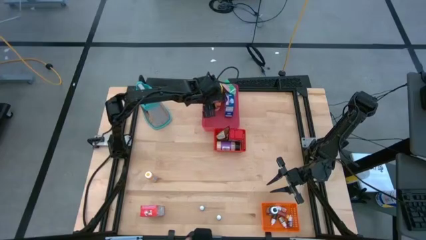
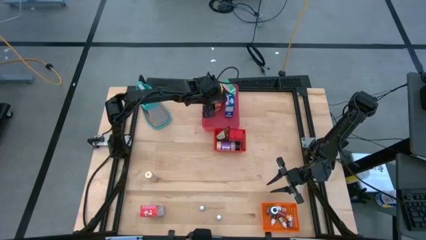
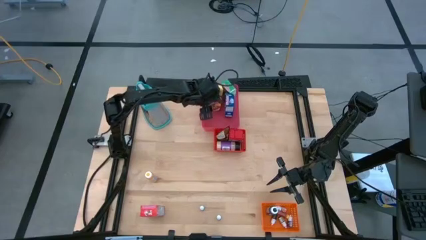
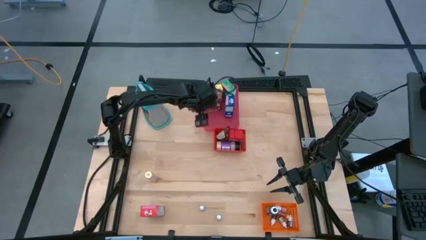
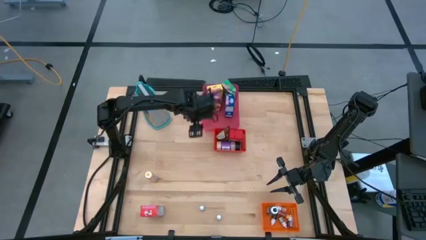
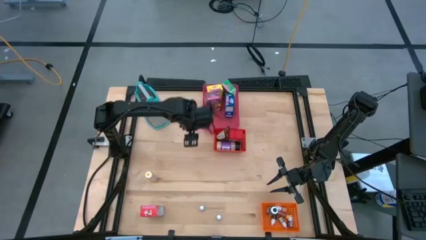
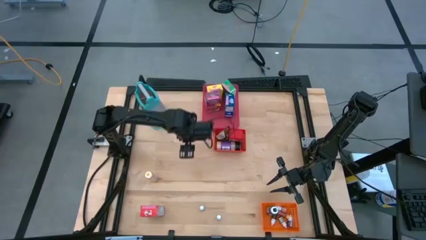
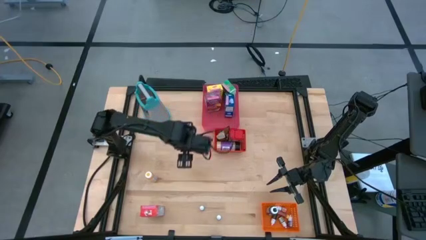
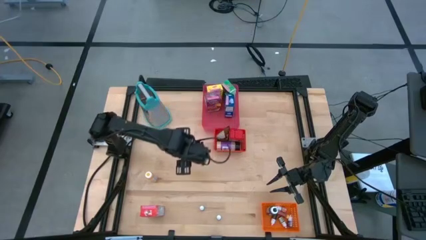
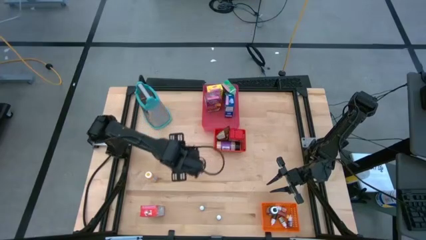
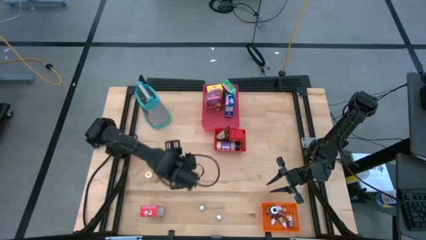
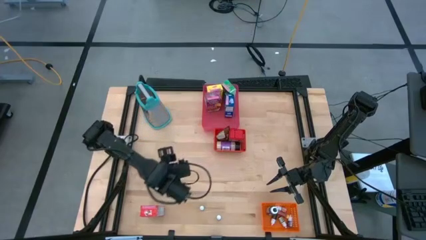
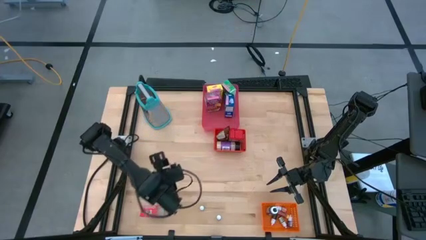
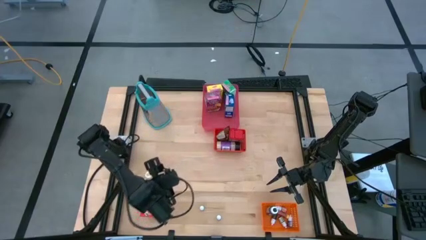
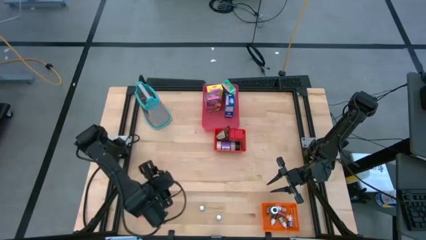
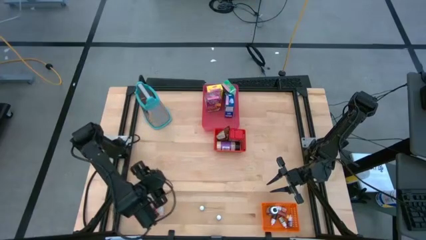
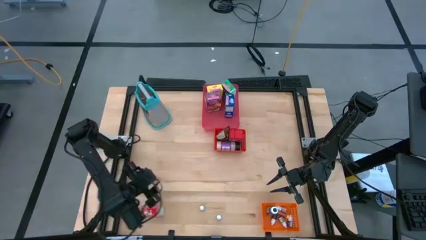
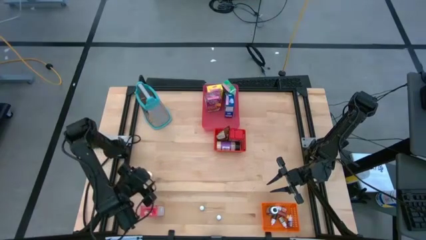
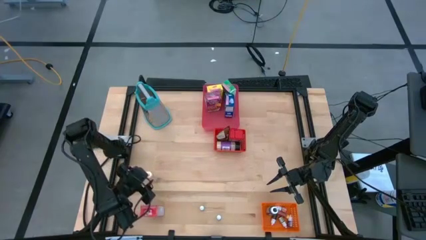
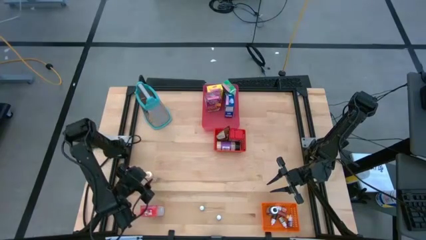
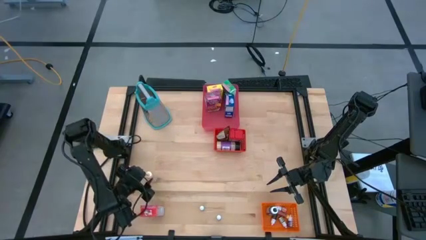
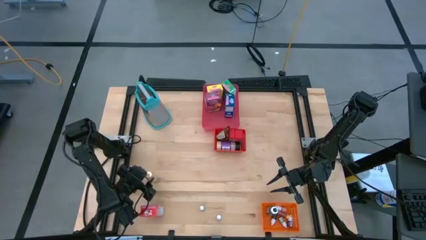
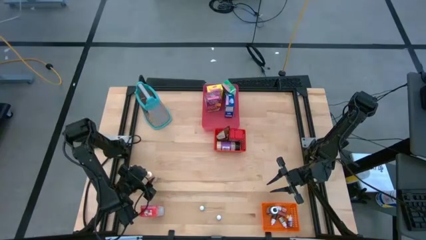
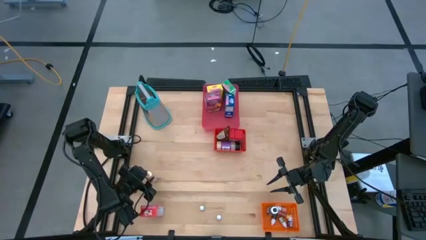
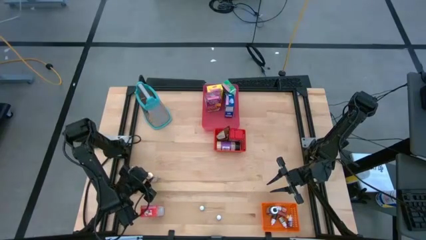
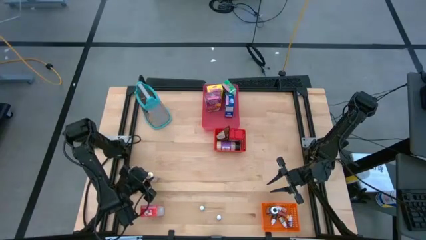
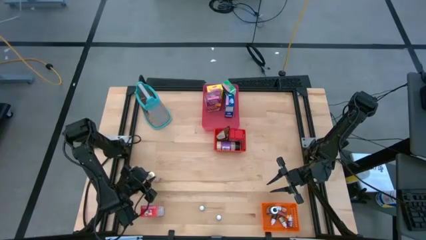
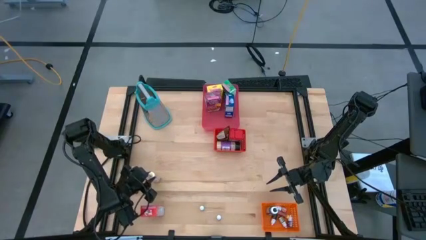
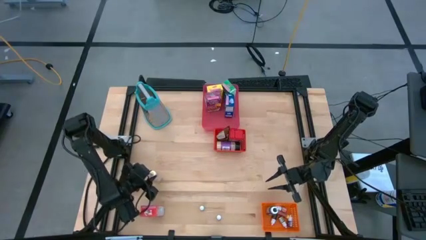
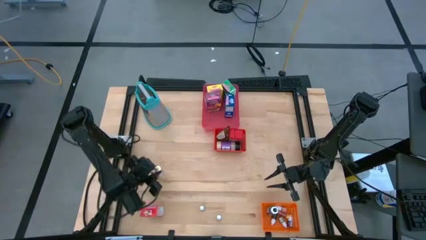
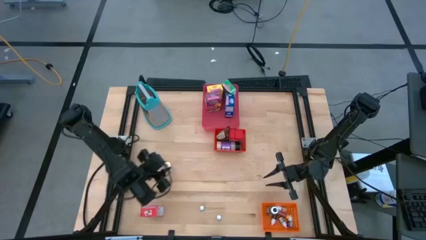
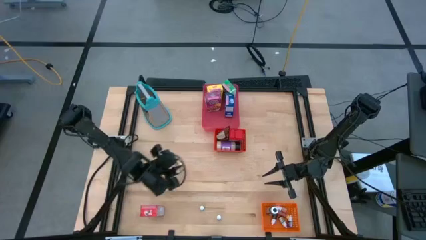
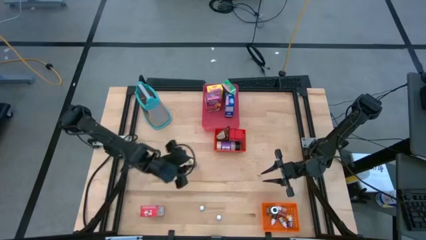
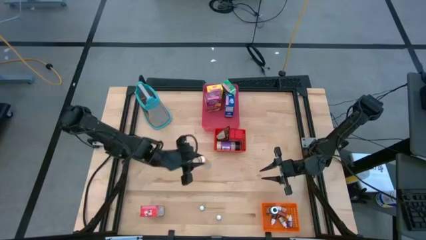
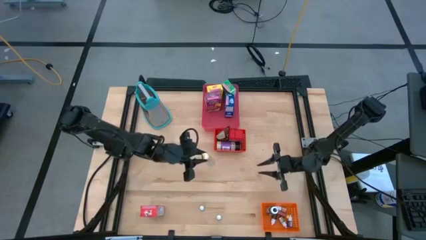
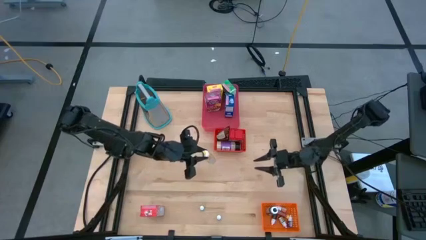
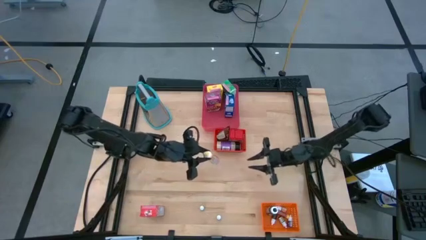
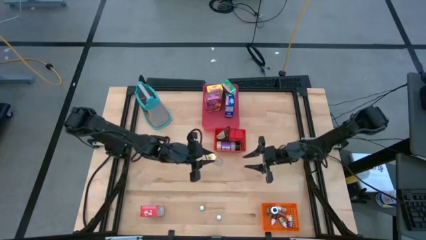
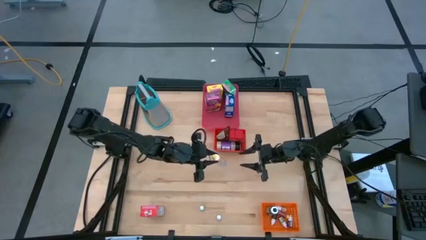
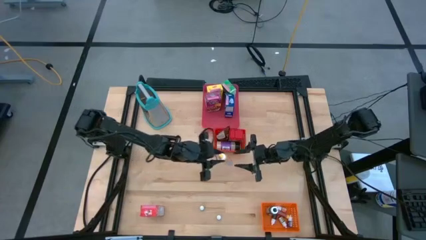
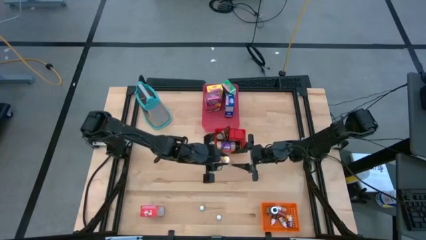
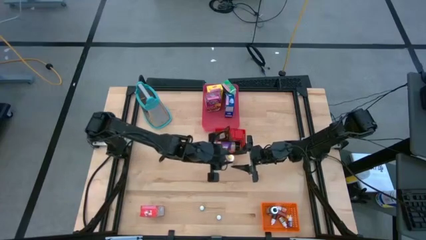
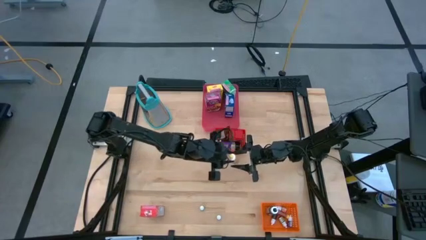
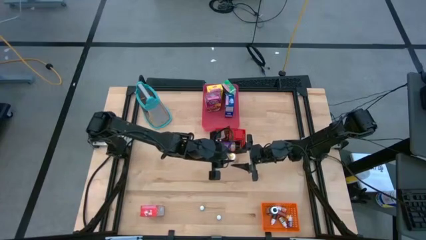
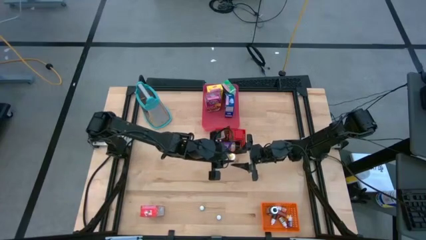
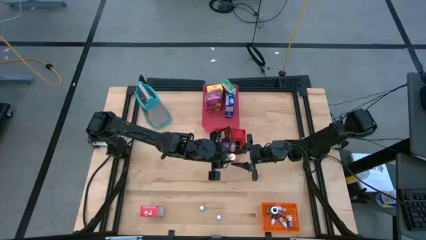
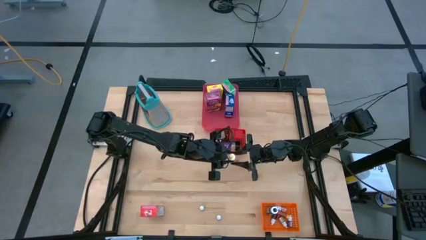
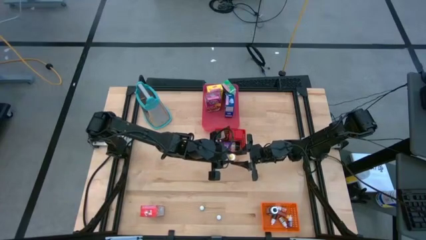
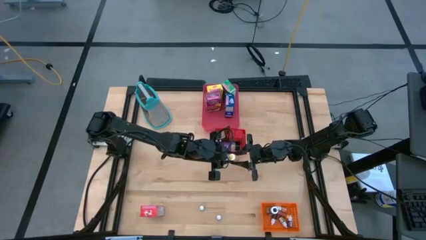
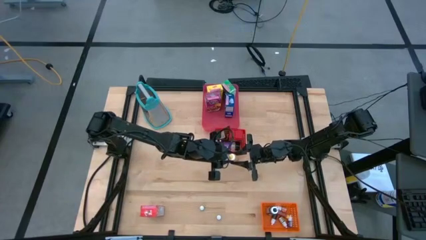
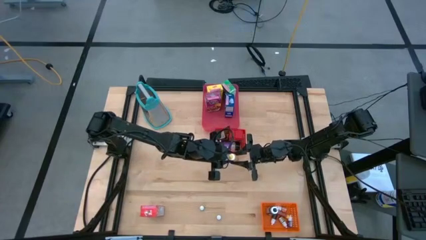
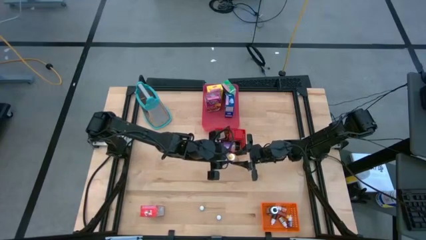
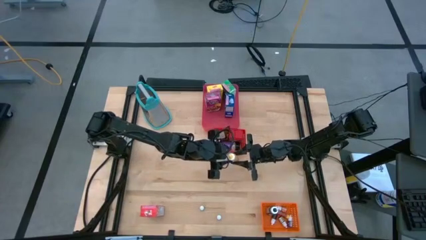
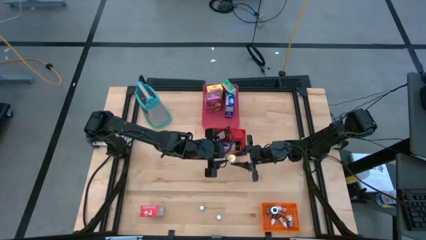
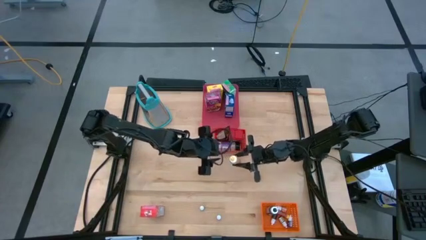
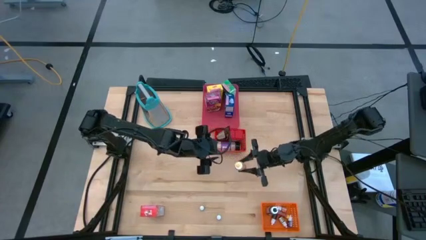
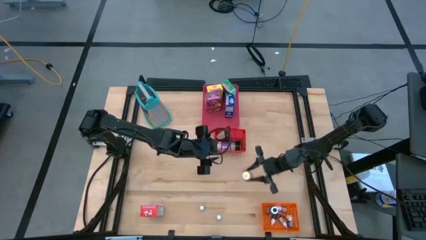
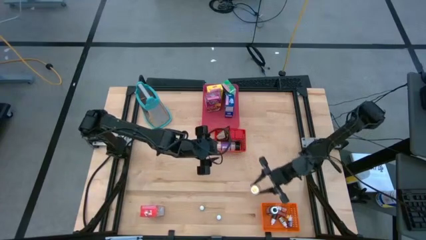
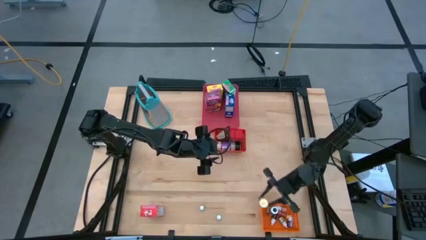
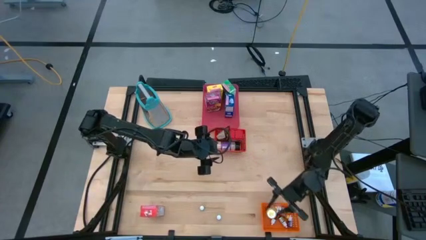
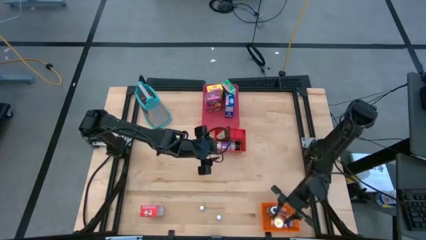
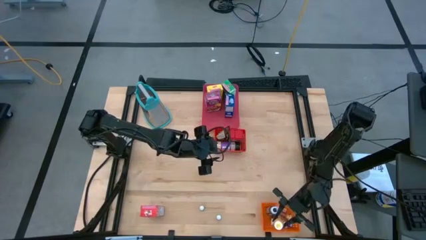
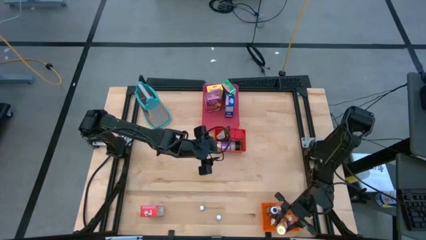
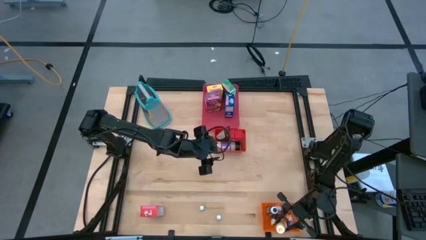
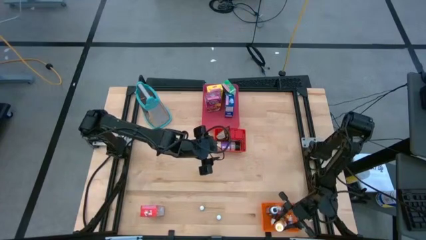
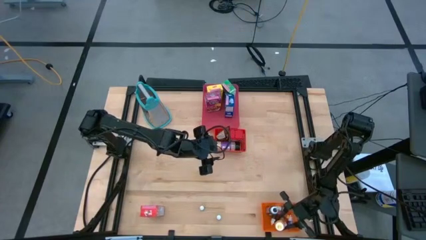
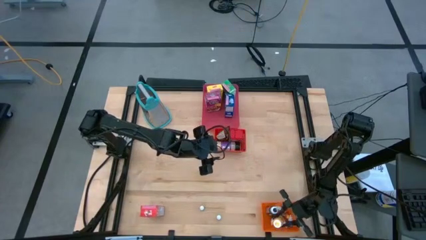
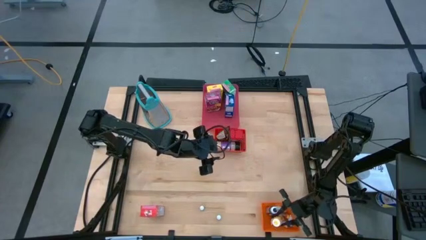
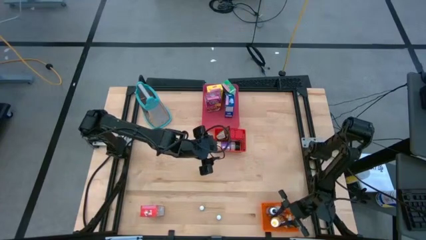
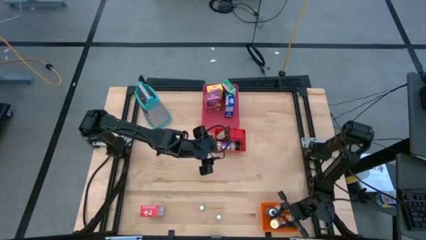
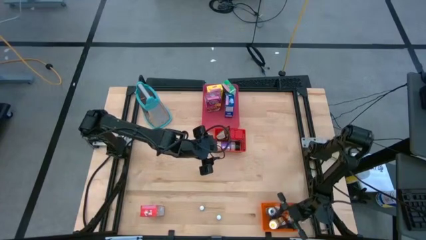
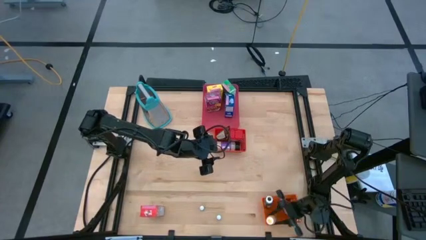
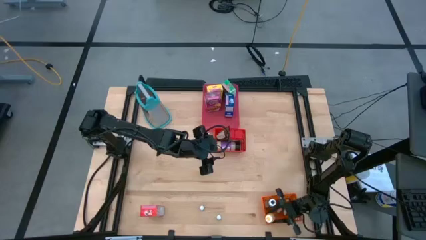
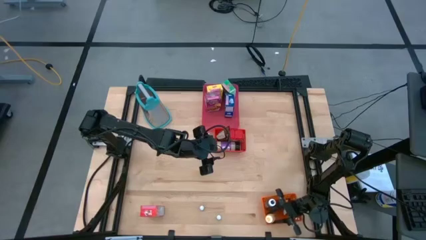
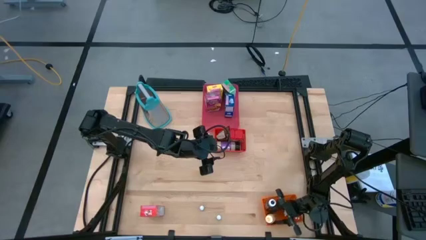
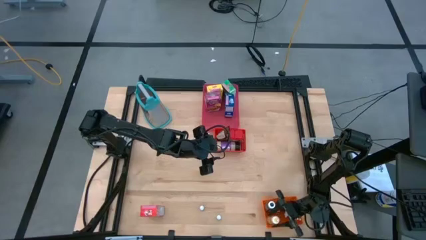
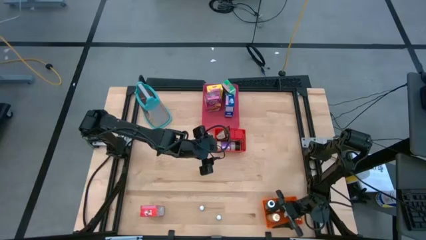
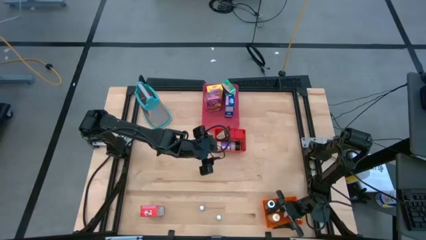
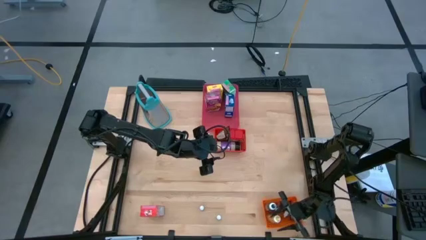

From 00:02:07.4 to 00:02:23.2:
Task: Pick & Place Kitchen Items
Put the yellow food coloring bottle into the orange bin
